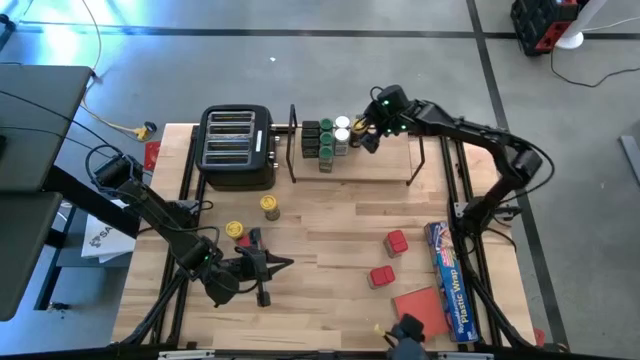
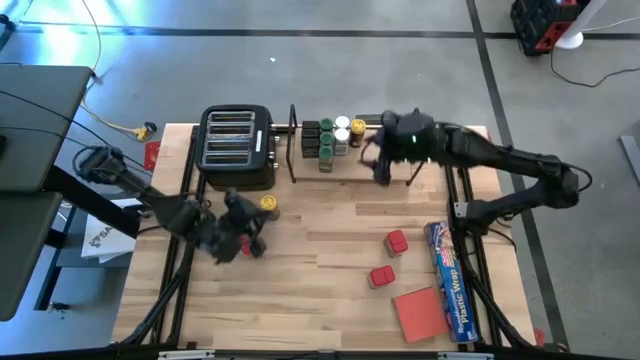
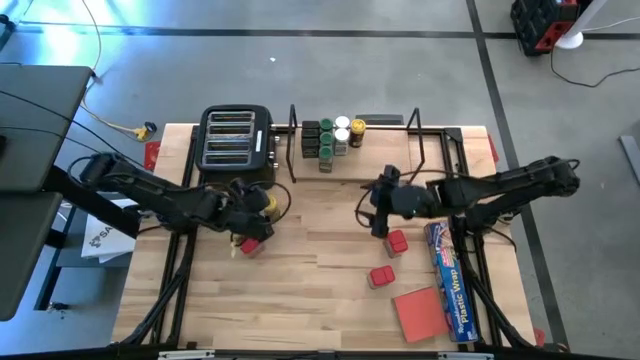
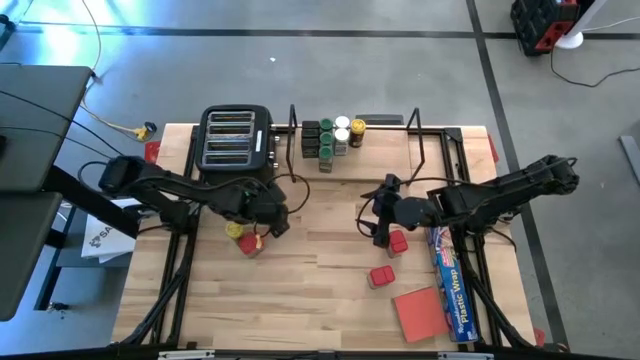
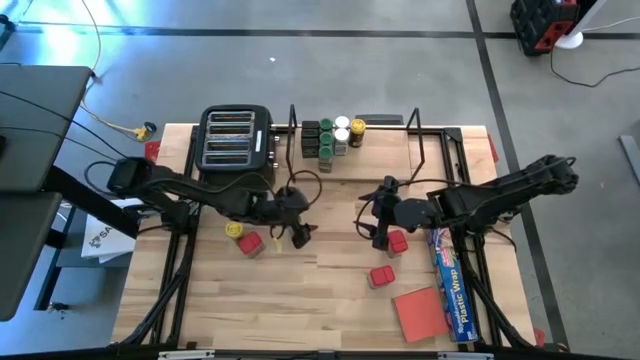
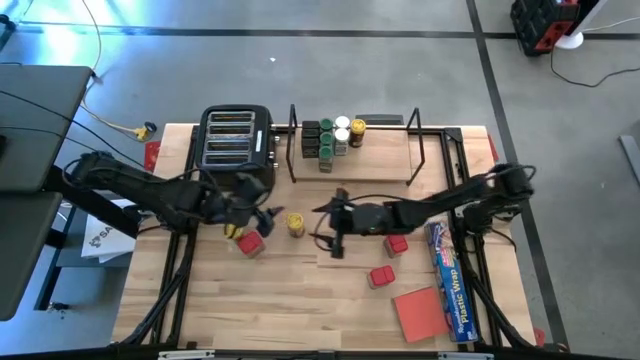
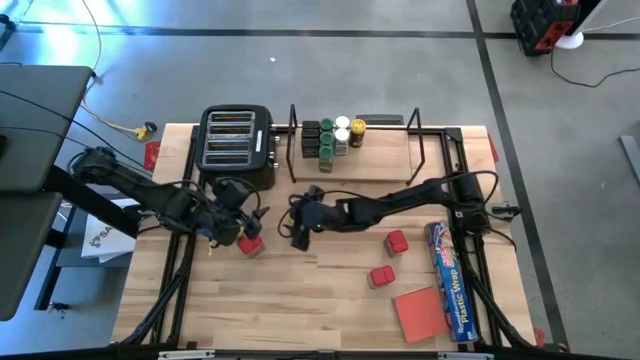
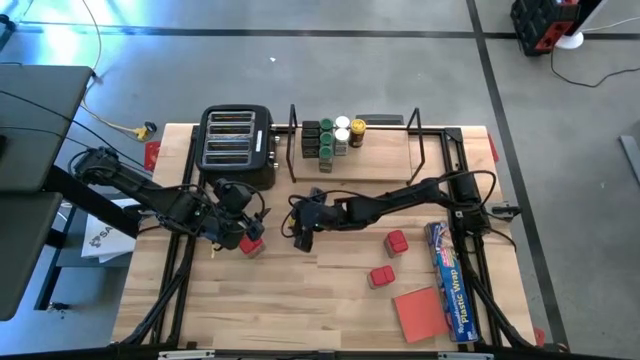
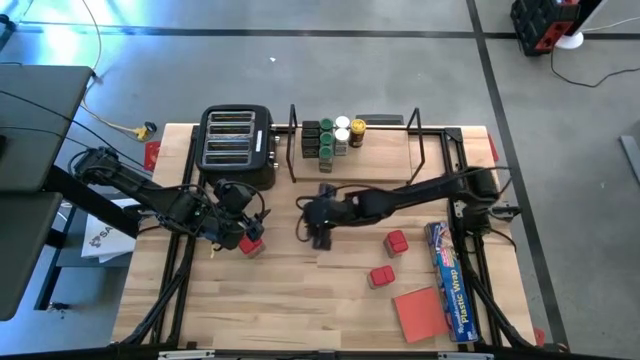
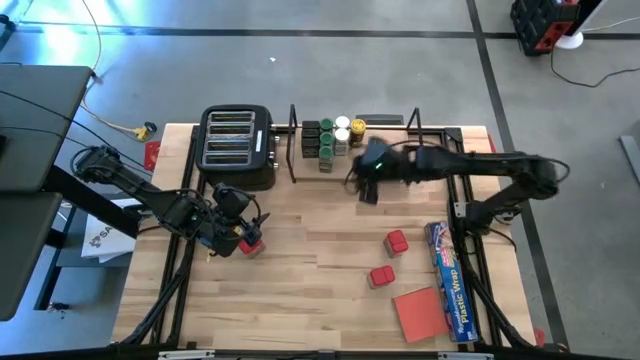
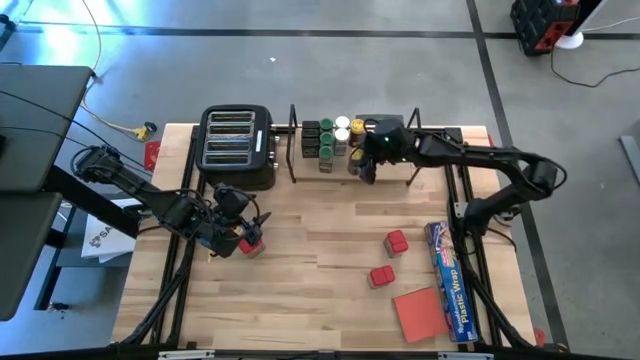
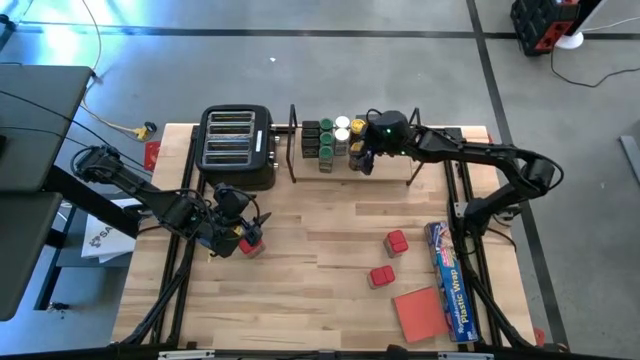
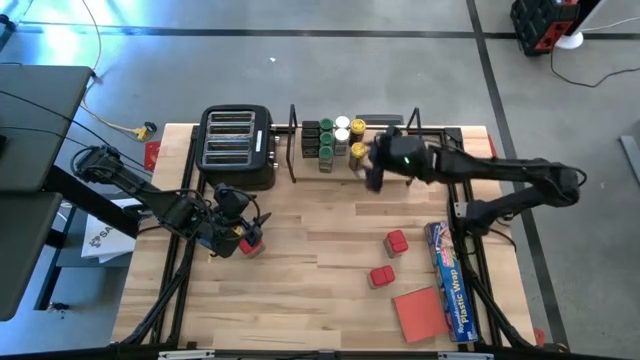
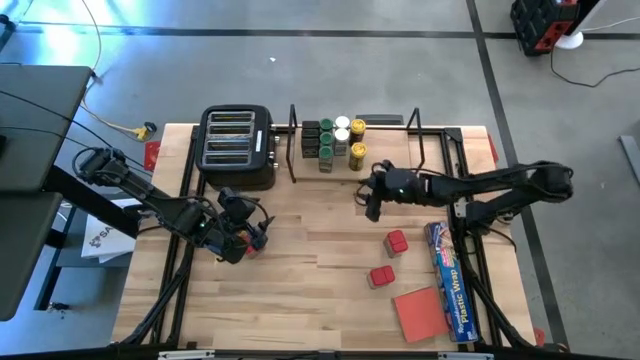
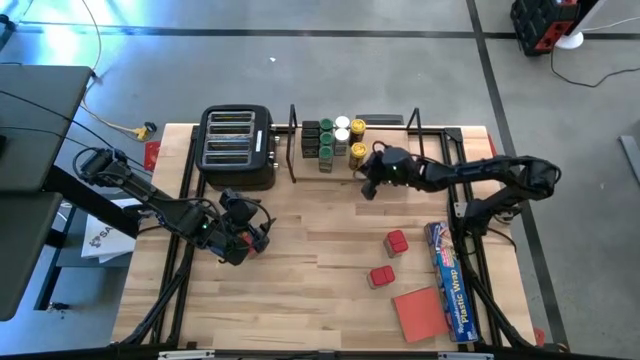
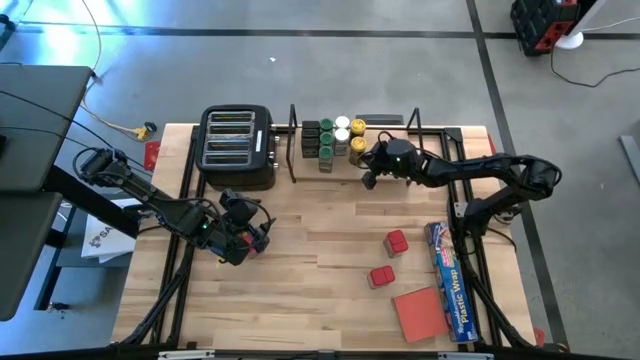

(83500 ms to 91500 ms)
Task: Shelf spices
Put the top yellow seasoning bottle on the shelf aligned with the other yellow seasoning bottle

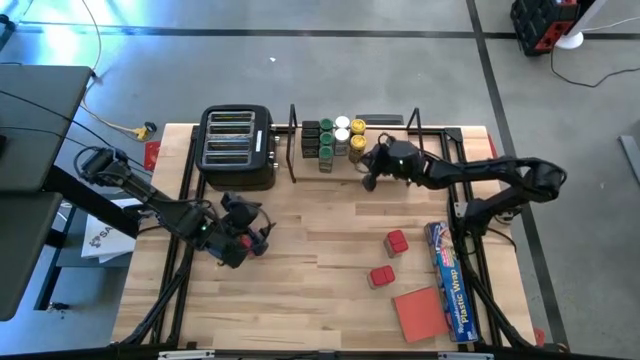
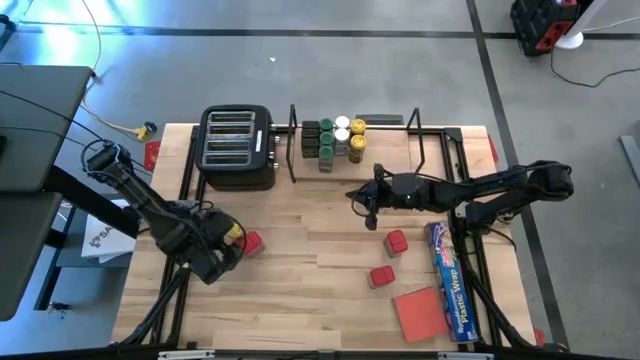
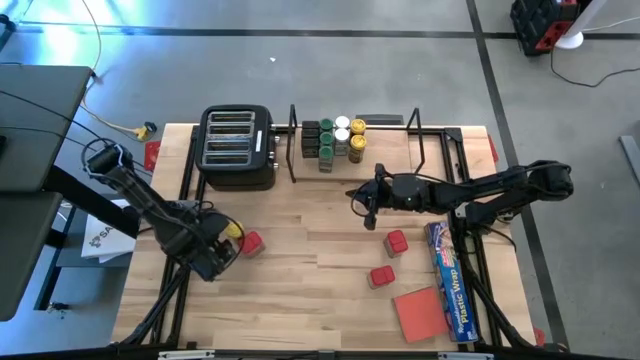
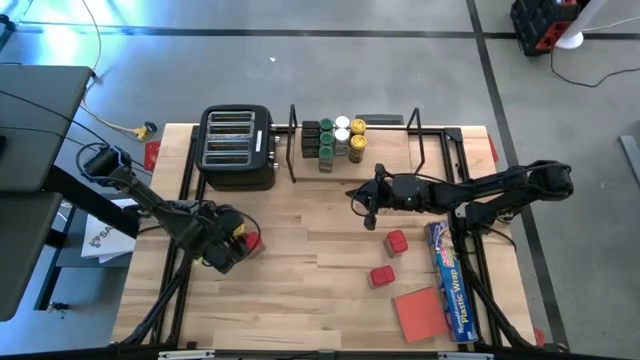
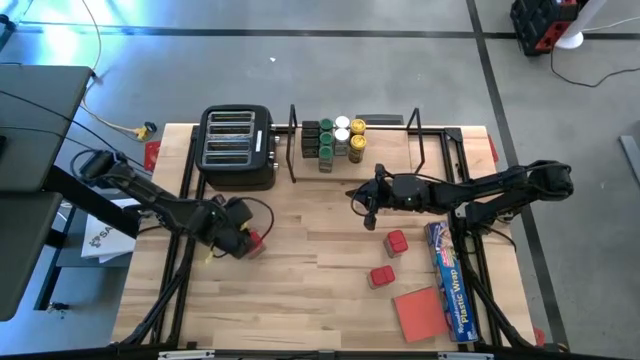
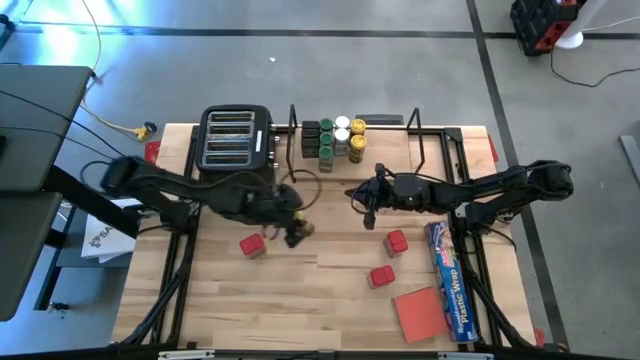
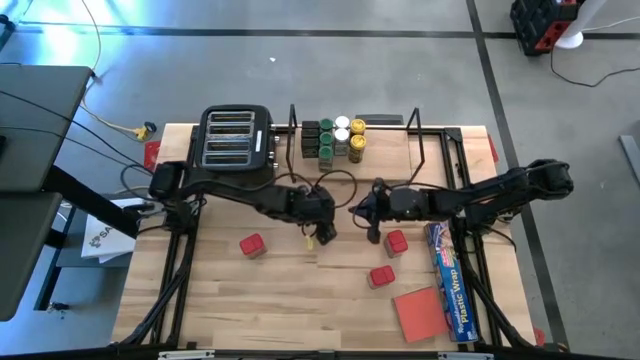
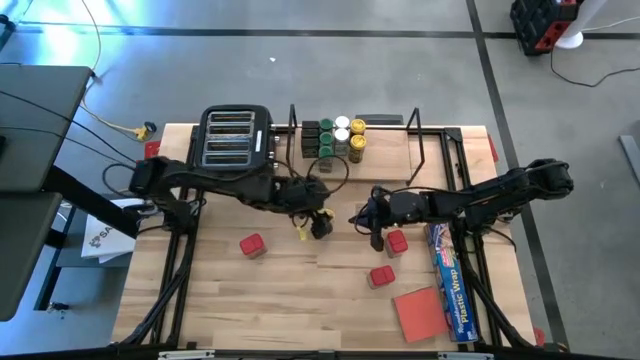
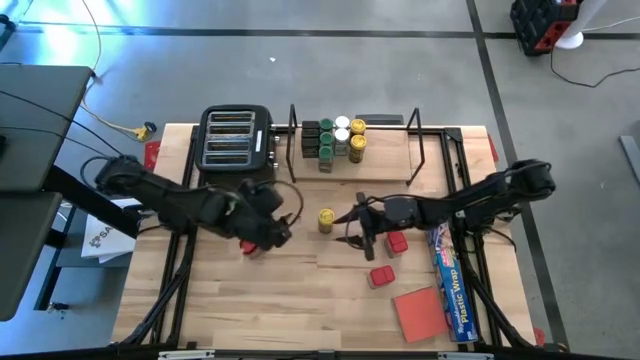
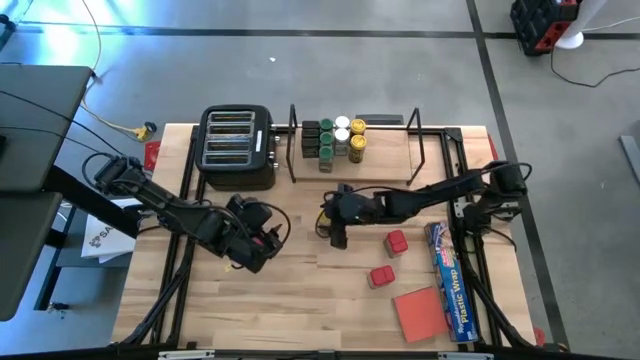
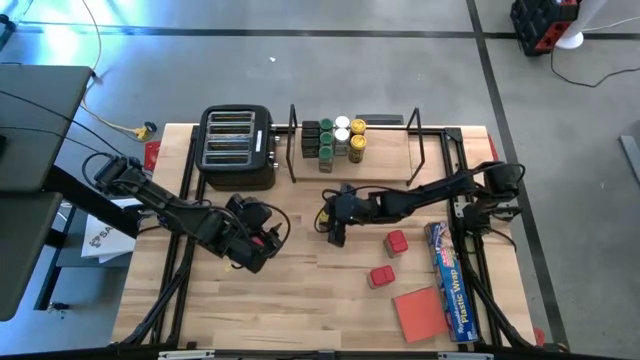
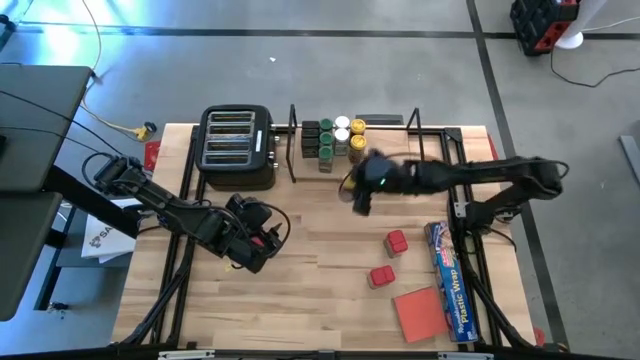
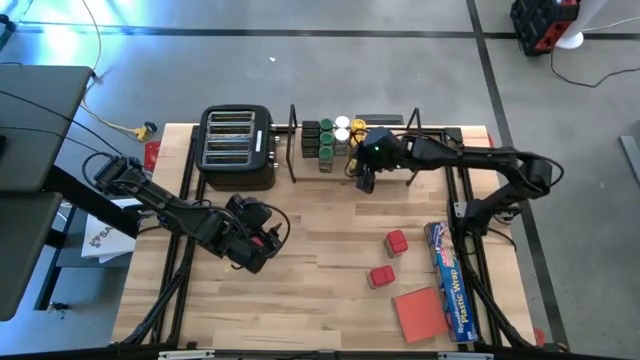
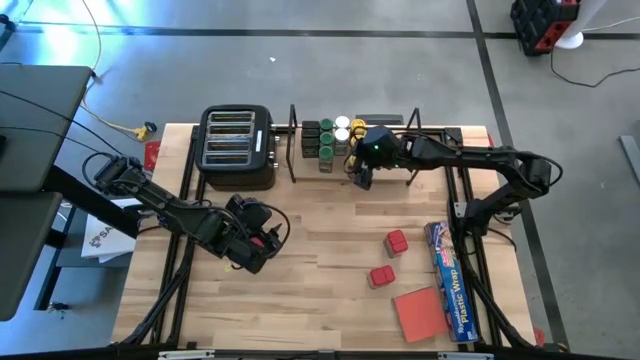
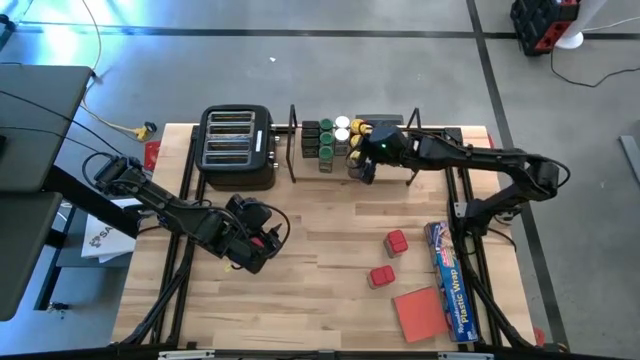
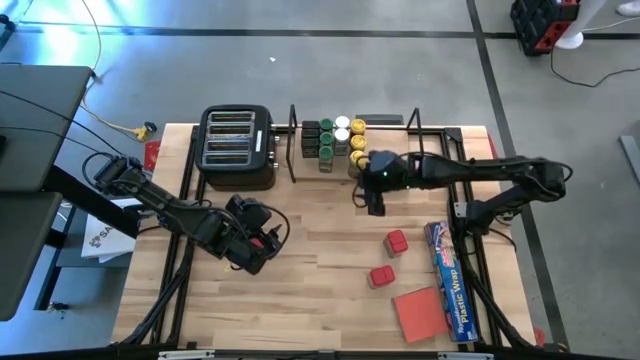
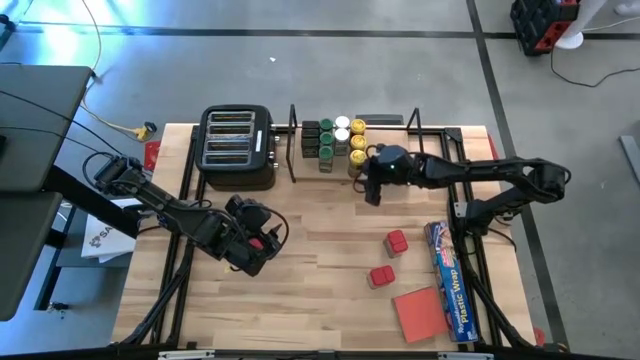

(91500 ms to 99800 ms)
Put the yellow seasoning bottle on the shelf aligned with the other yellow seasoning bottles

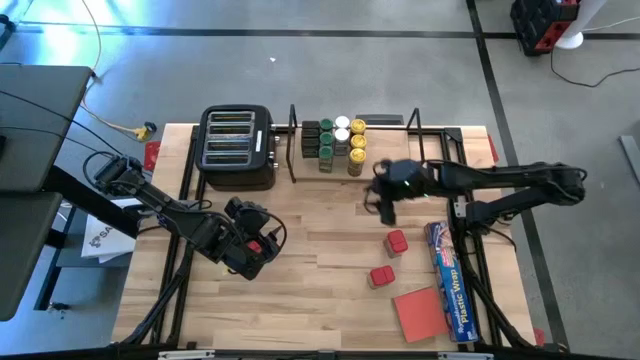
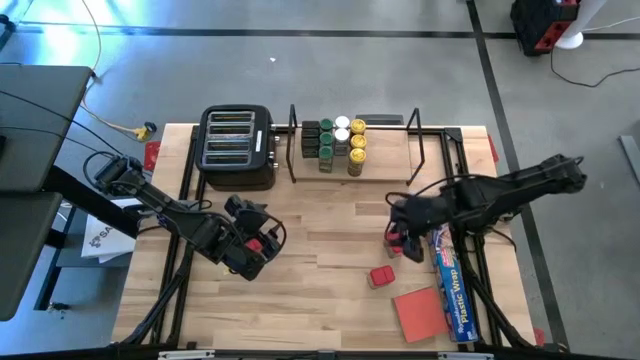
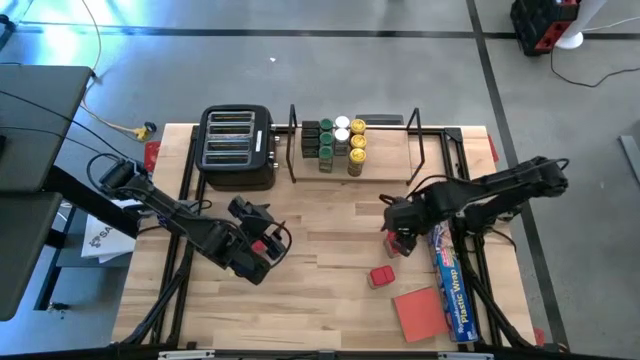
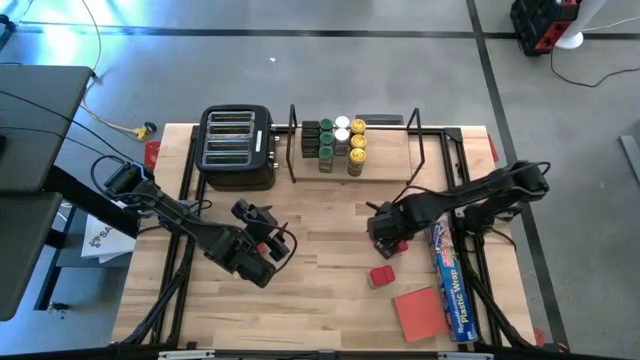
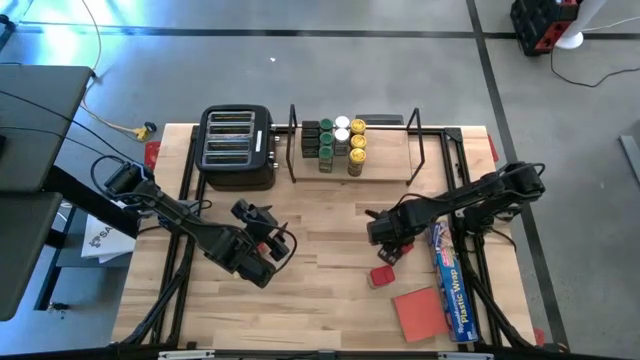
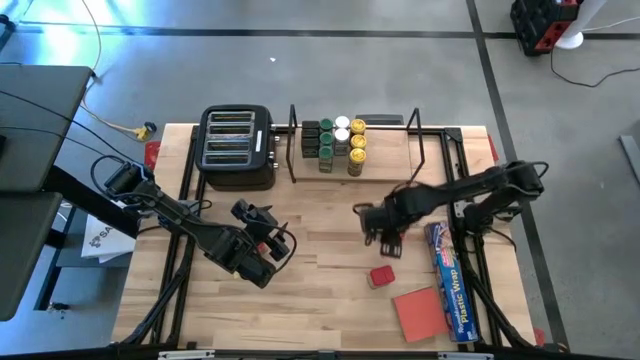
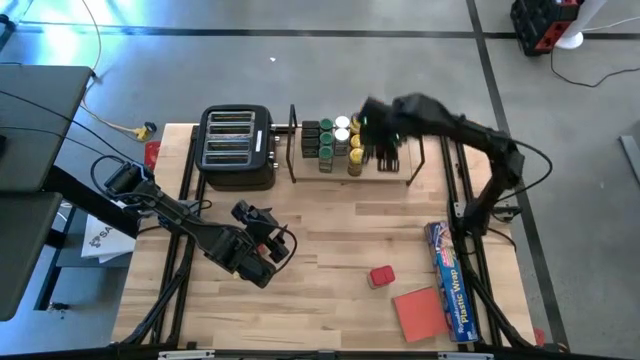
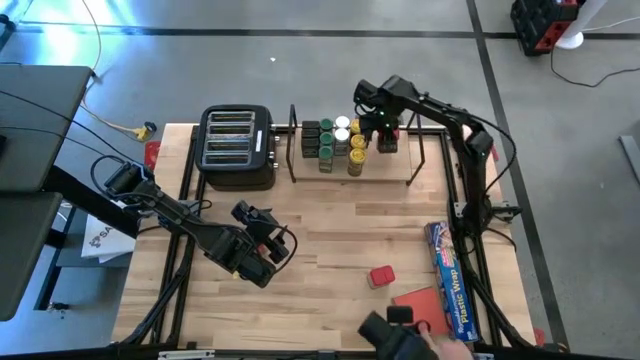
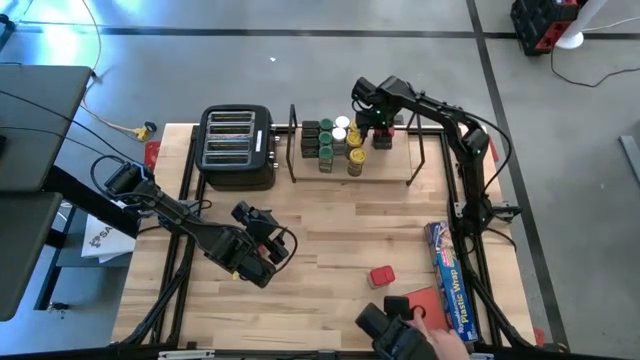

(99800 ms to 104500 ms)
Put the top right red seasoning can on the shelf

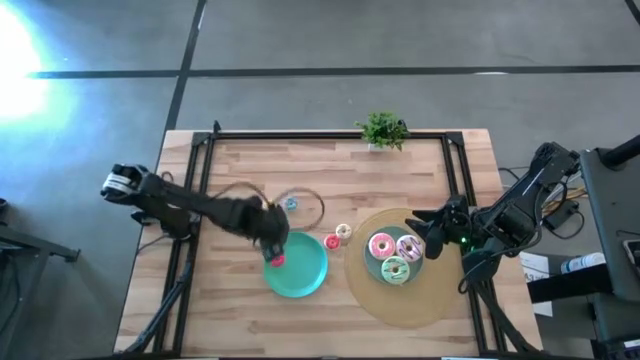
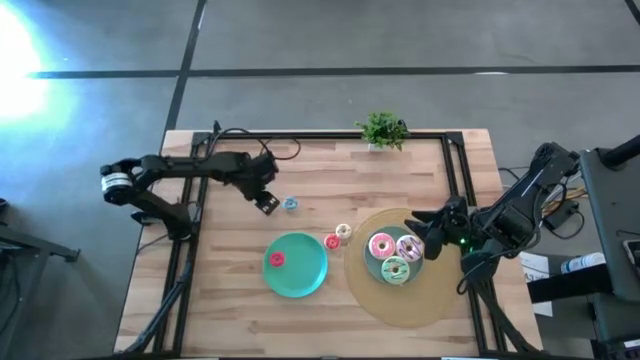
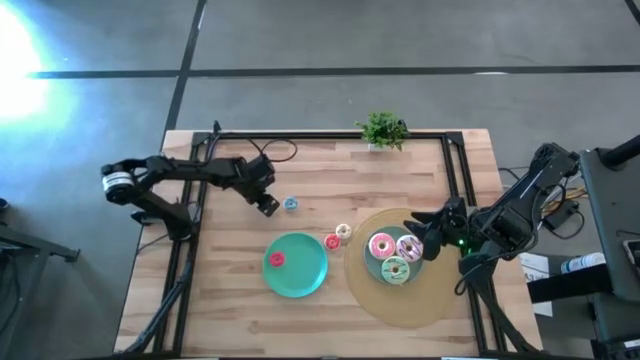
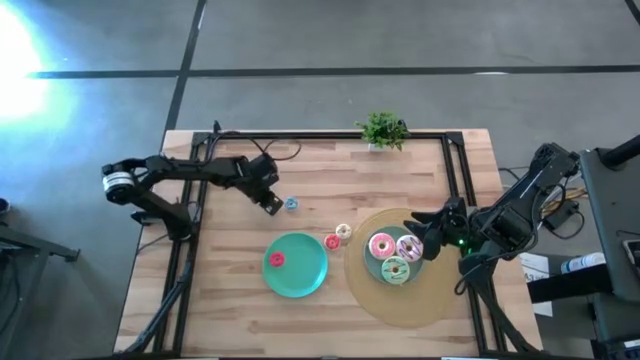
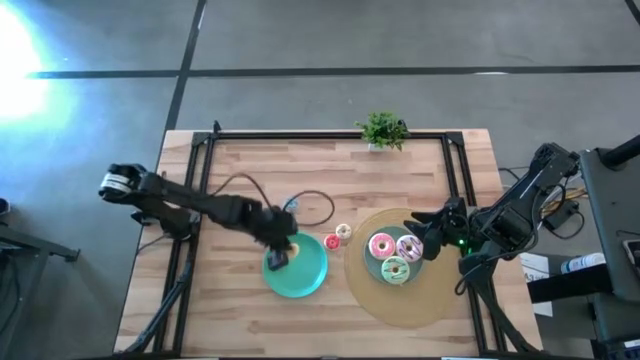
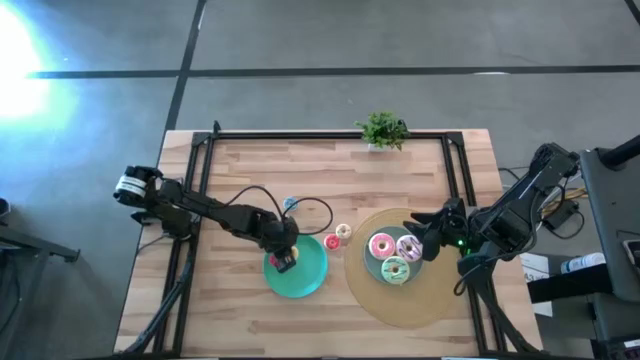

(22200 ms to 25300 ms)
Task: Pick & Place donuts
Put the small yellow donut on the blue plate
